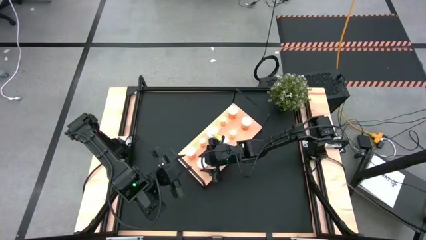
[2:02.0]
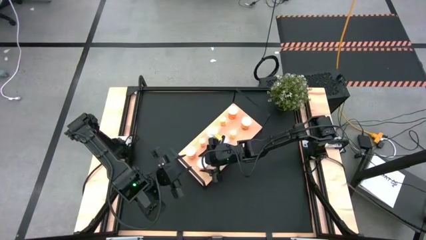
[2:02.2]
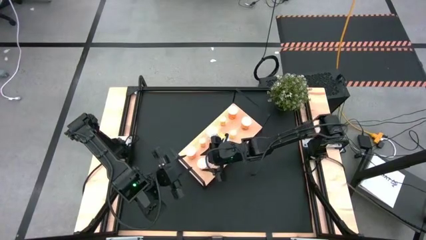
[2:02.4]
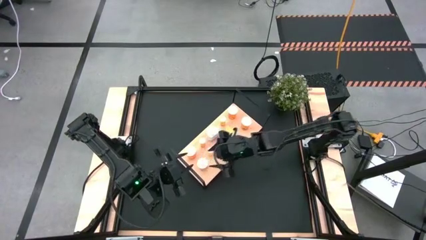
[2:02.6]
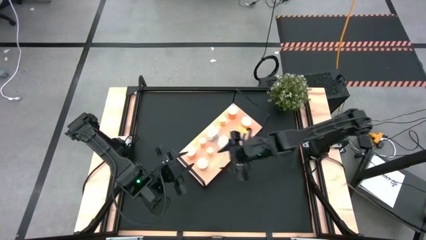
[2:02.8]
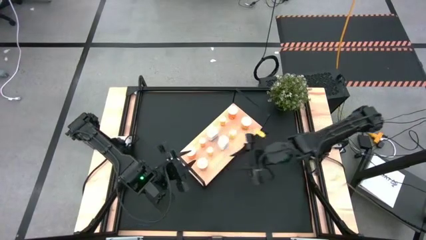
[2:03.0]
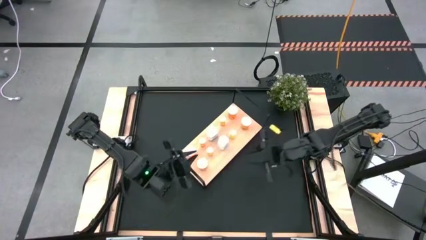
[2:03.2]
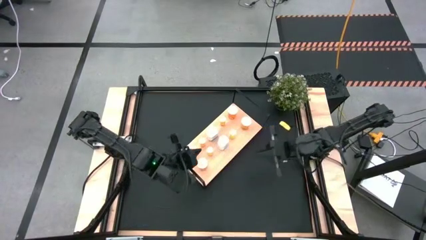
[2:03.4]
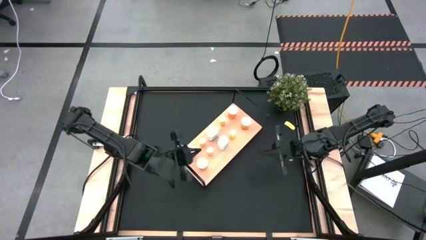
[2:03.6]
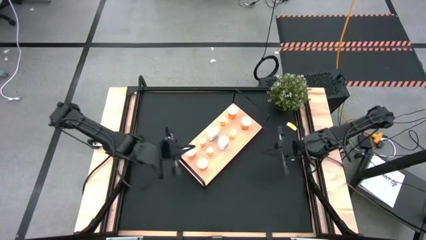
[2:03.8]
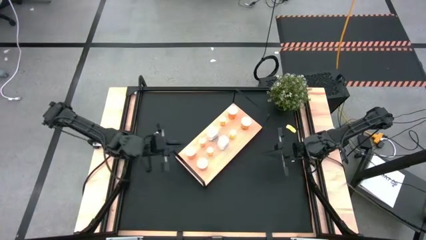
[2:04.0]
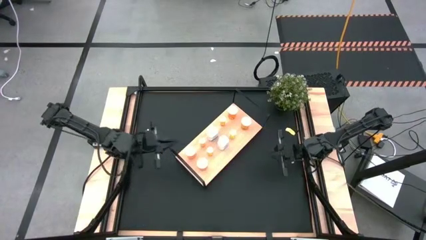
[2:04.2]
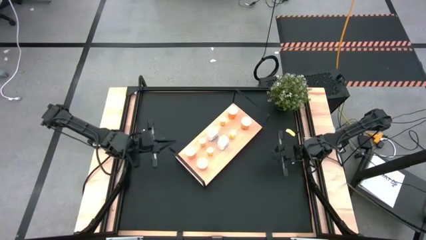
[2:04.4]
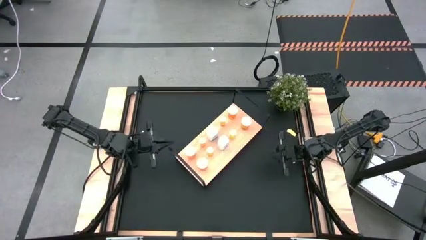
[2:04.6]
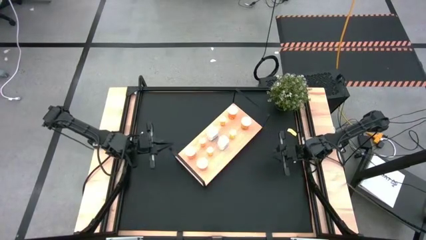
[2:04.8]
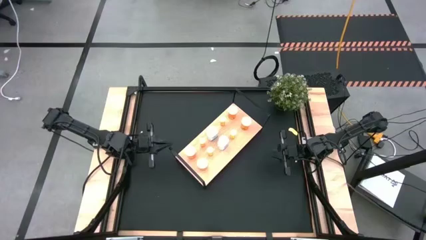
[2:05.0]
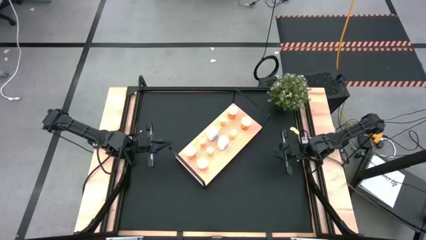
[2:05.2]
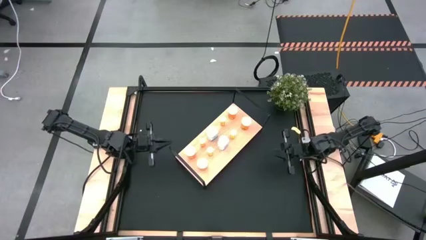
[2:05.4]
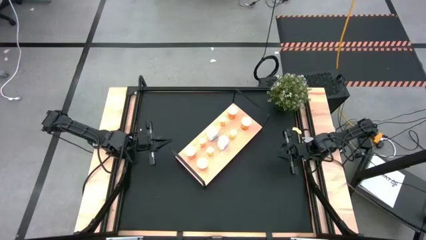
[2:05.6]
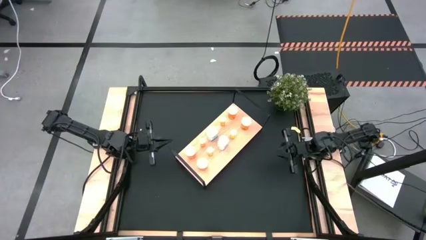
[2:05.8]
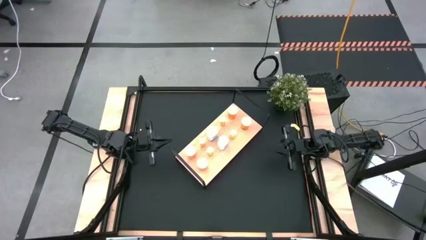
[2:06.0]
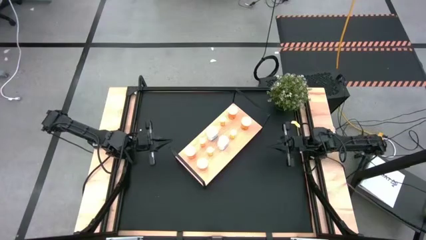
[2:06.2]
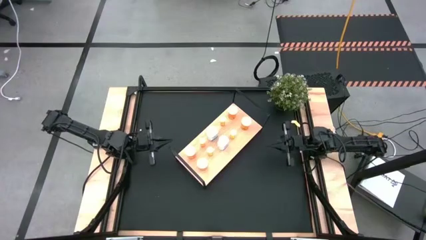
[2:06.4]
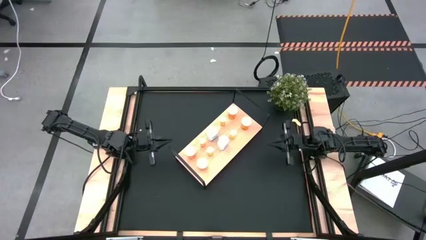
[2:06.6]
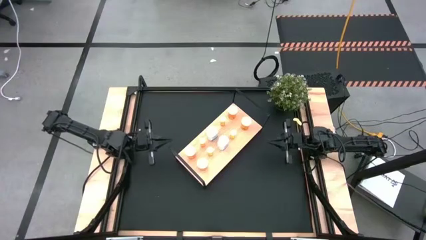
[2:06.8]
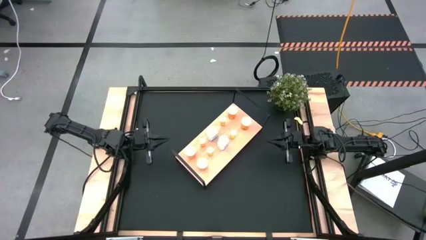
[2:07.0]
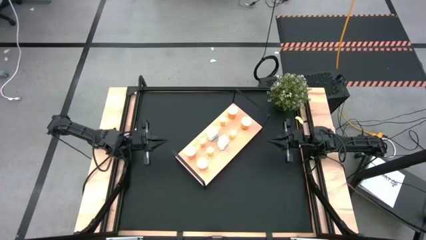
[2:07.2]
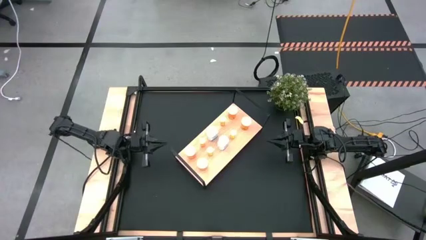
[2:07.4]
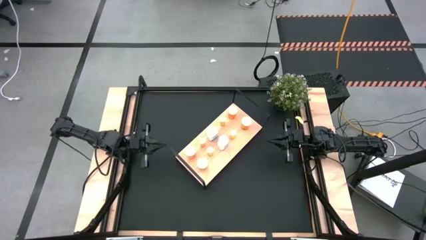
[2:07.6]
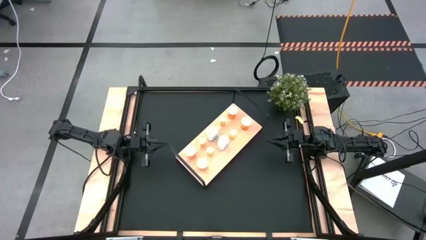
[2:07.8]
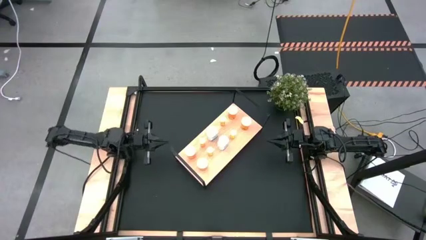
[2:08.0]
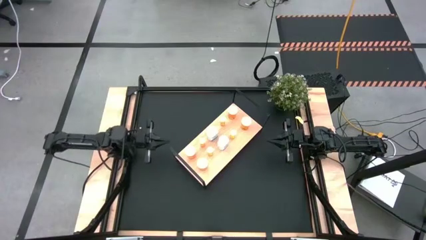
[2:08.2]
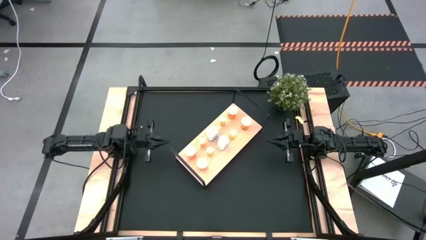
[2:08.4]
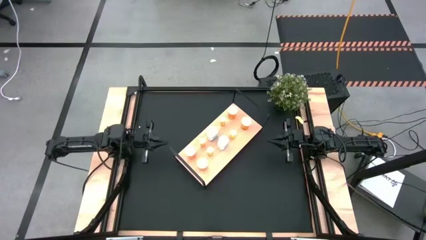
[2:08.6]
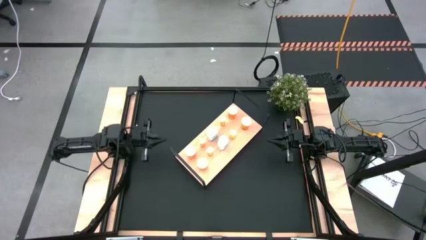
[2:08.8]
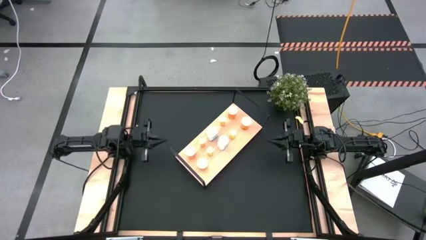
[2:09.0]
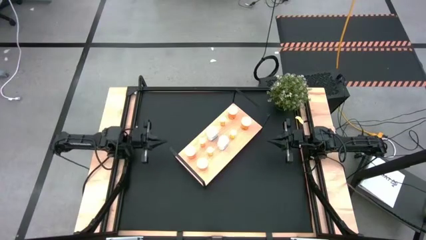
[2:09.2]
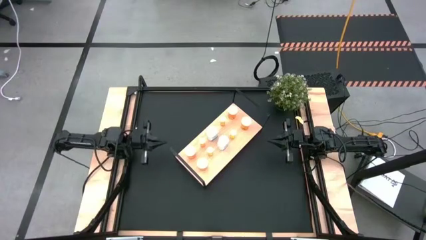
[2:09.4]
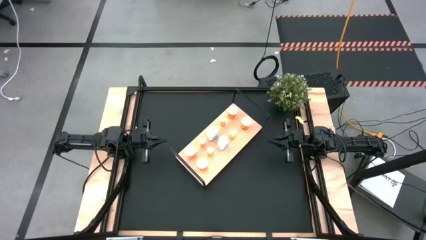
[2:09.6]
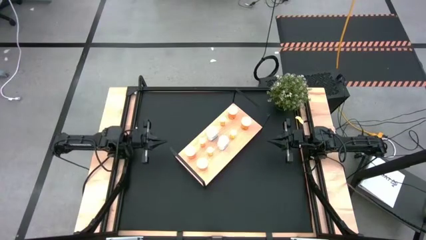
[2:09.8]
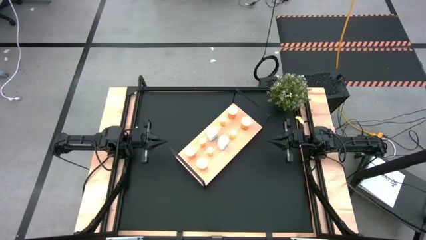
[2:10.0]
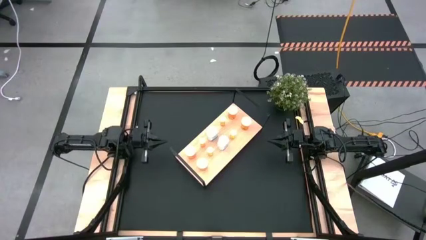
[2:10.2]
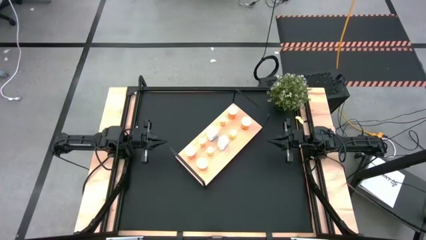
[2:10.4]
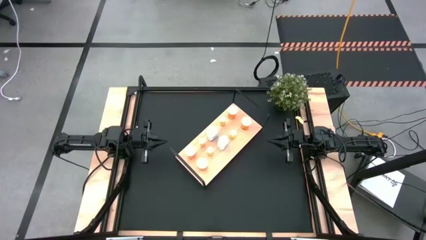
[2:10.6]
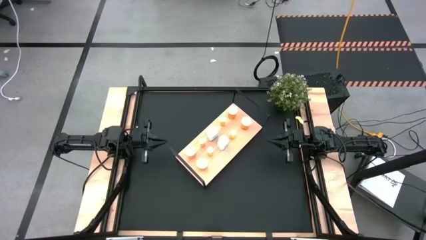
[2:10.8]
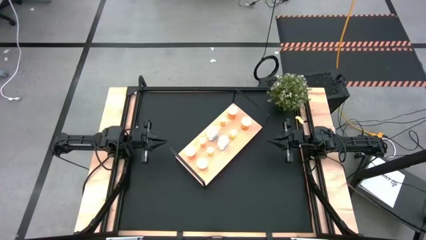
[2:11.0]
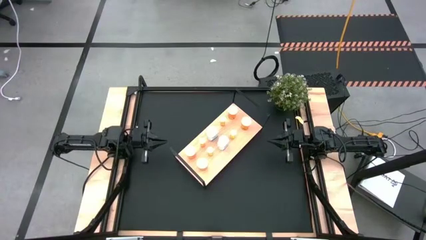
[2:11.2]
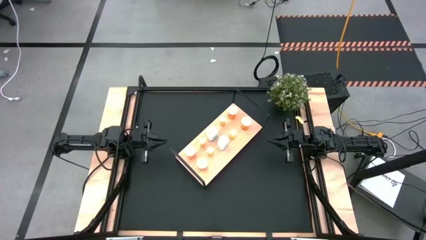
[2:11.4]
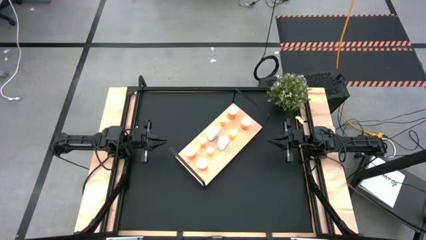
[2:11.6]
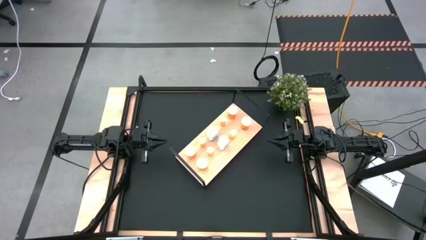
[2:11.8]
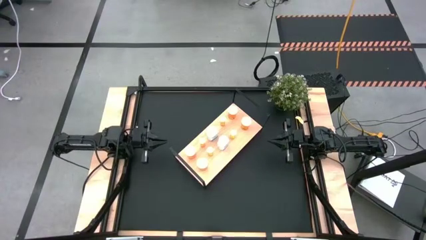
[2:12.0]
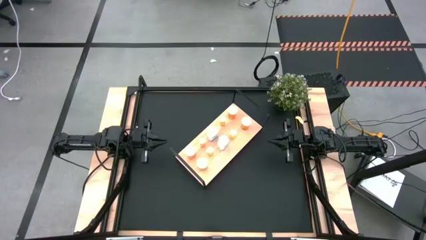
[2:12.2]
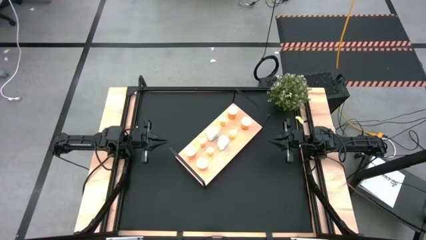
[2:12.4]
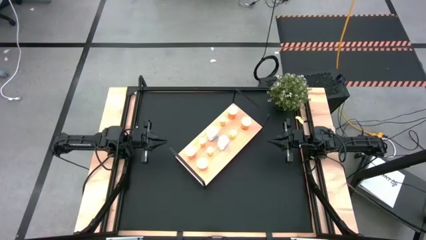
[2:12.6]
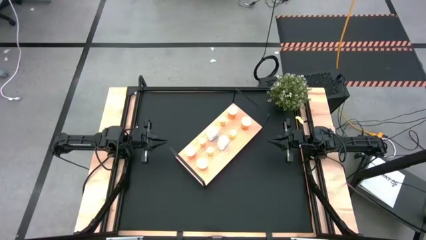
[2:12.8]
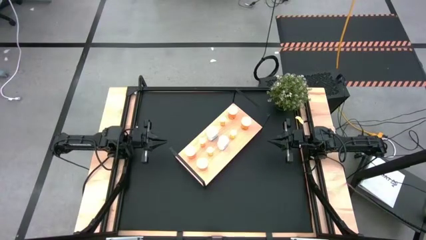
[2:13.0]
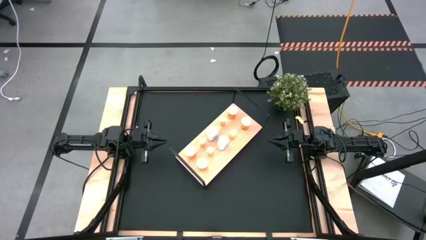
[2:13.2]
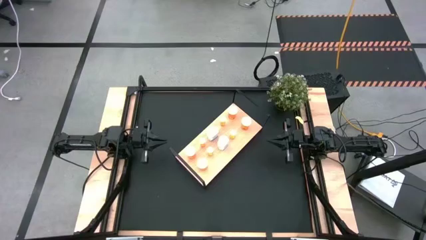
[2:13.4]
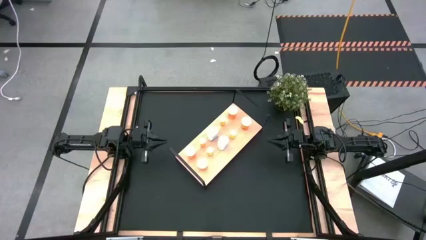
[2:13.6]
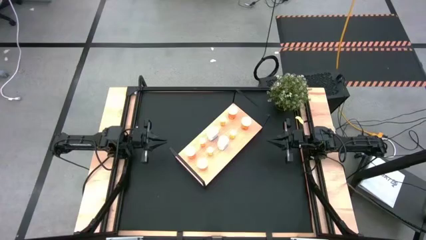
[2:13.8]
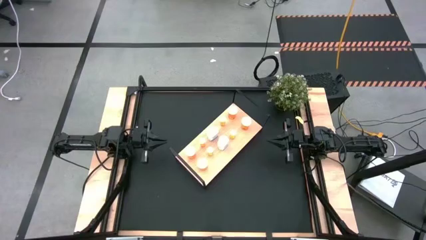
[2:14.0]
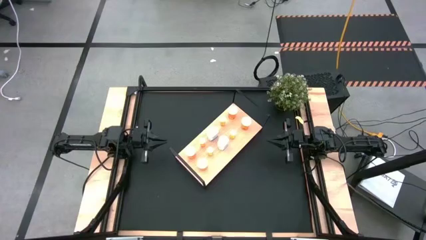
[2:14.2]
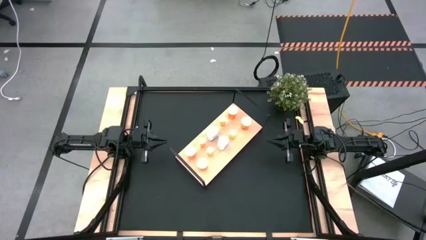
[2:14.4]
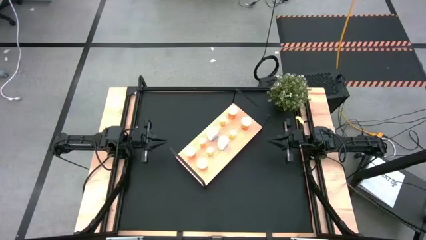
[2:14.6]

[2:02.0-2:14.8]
Task: Pick and place medicine bottles onto shelf by color
Return to Home Position

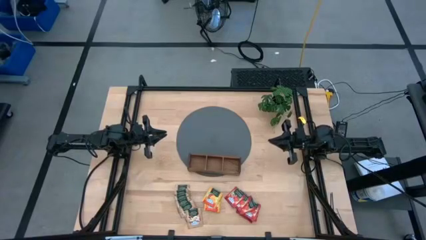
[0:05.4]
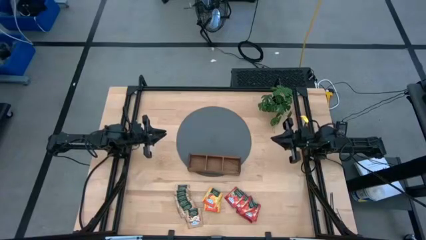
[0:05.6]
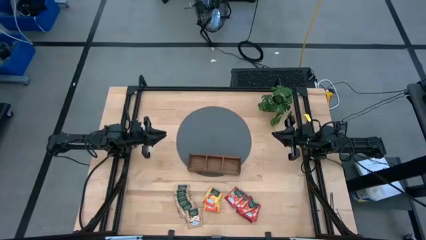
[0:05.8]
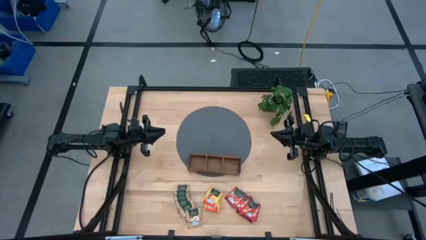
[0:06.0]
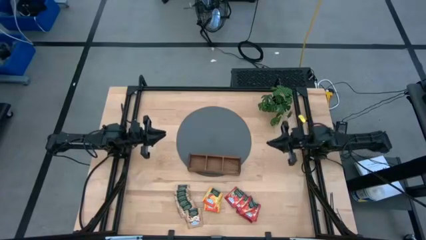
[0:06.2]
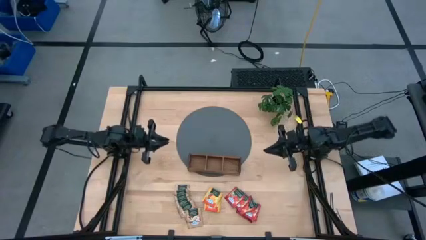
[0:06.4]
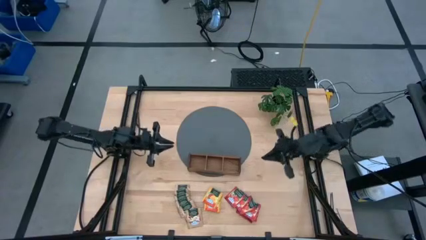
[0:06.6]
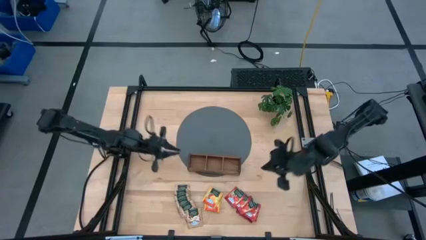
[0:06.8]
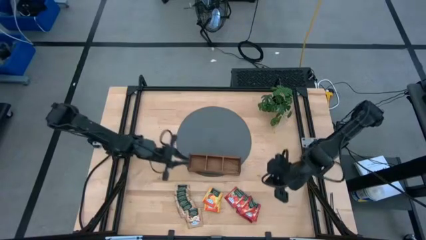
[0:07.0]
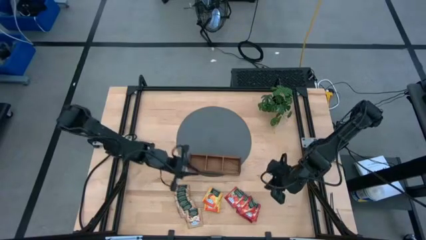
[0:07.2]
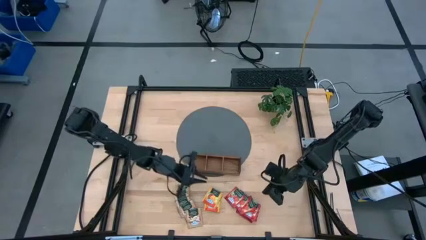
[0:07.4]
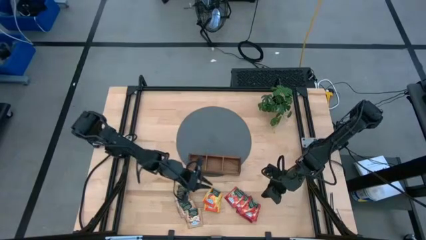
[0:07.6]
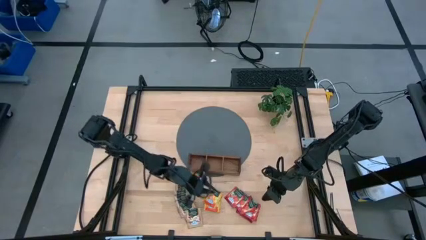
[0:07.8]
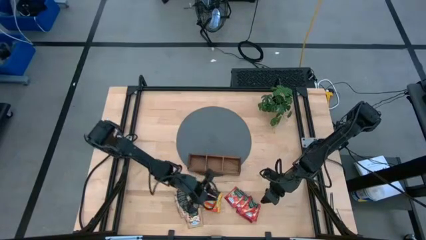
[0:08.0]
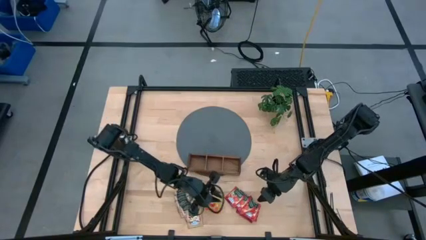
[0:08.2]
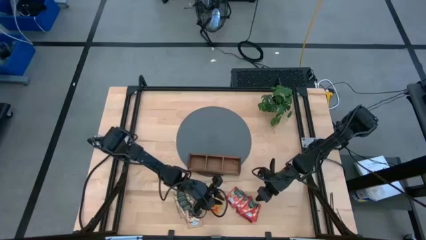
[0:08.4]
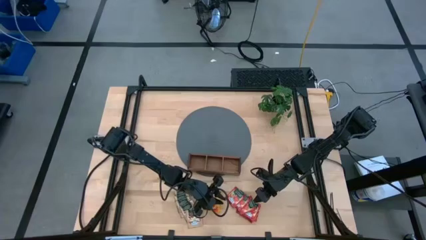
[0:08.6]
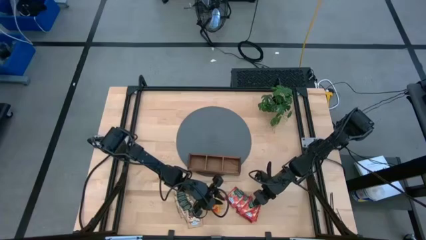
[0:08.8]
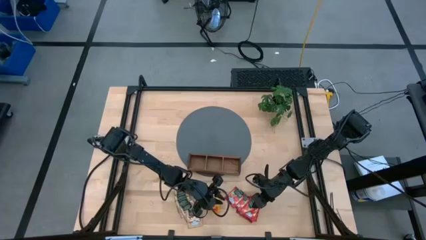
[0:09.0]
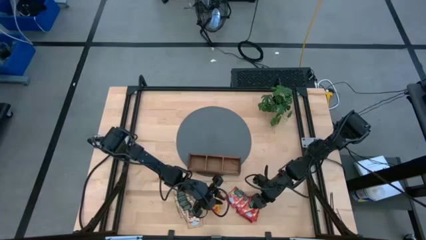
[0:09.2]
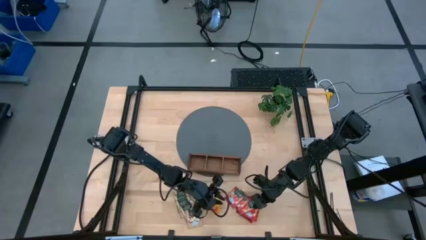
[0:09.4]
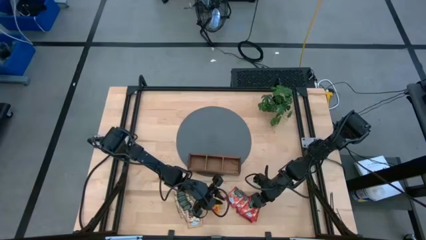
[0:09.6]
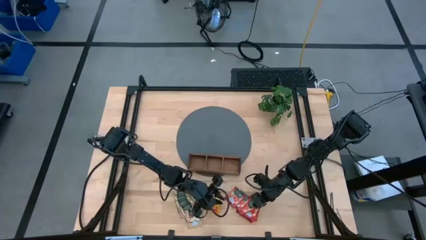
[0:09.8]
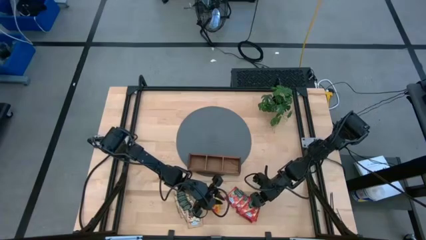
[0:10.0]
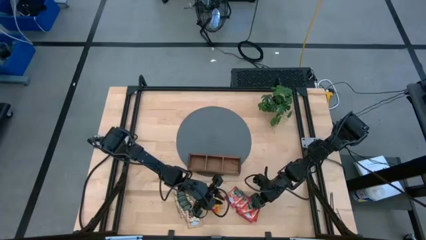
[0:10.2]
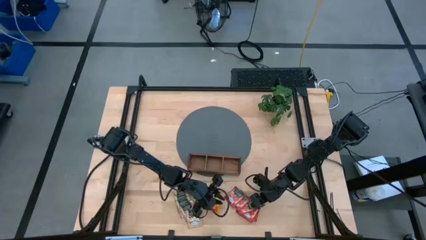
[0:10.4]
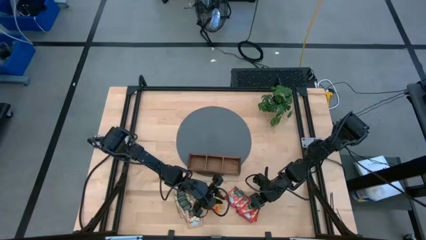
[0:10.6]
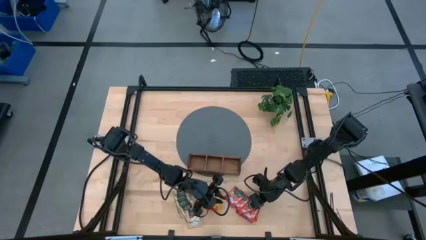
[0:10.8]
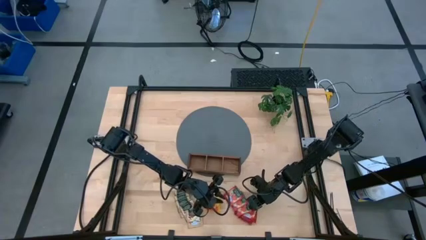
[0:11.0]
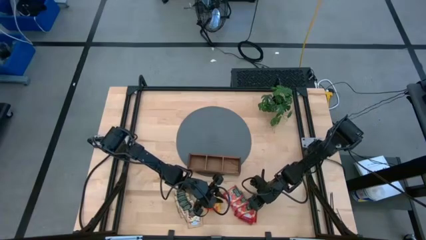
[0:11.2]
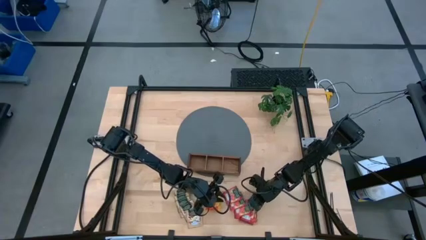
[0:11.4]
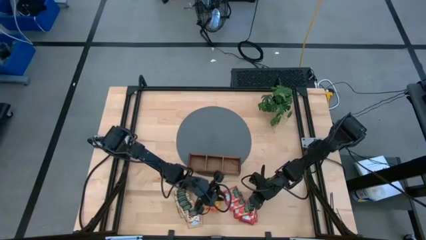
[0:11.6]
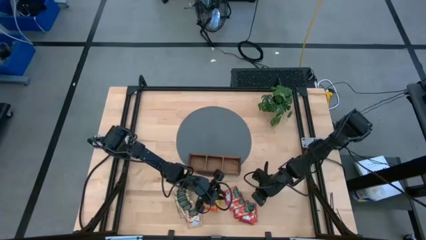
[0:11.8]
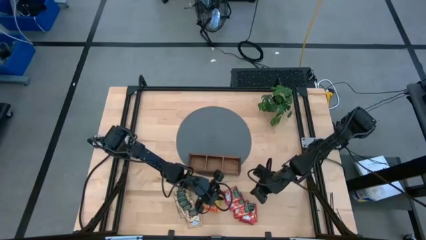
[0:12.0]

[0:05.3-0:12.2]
Task: Pick & Place Tea
Put the red tea bag into the brown organizer
